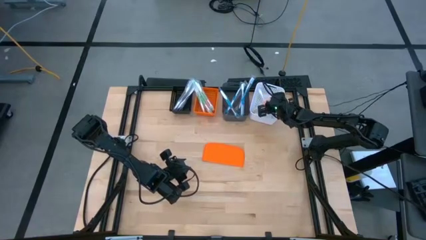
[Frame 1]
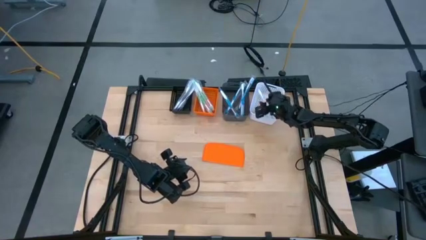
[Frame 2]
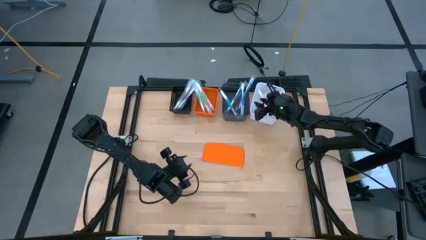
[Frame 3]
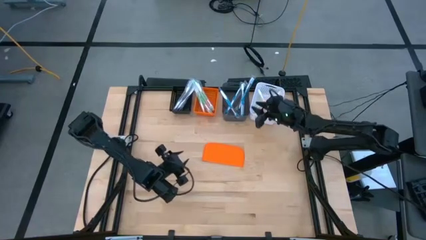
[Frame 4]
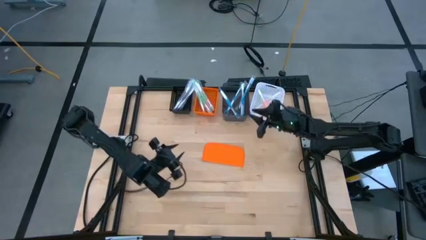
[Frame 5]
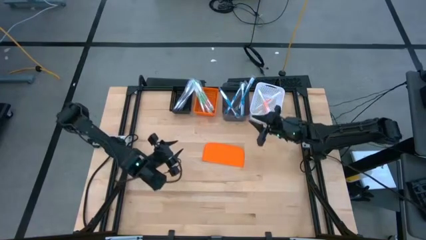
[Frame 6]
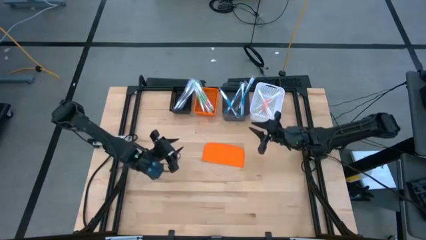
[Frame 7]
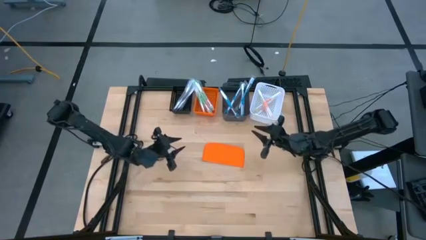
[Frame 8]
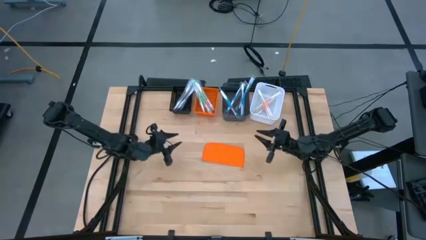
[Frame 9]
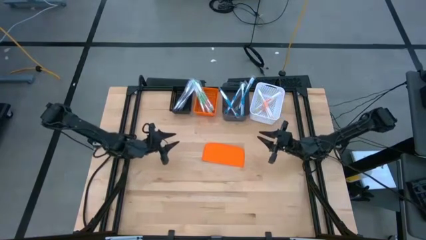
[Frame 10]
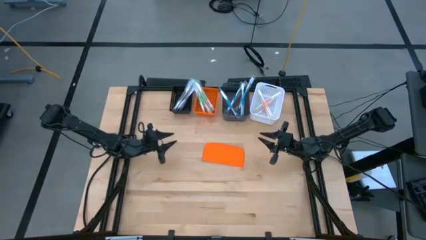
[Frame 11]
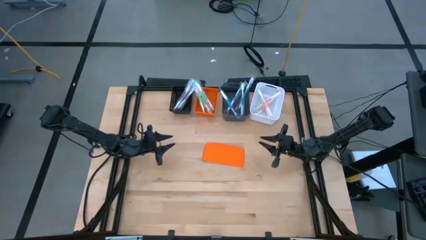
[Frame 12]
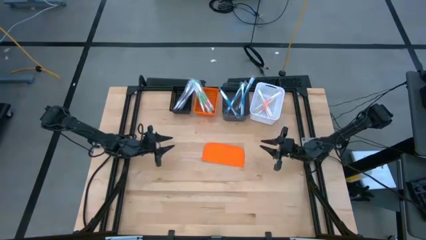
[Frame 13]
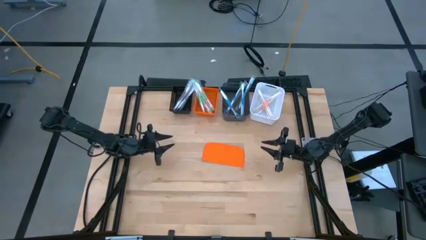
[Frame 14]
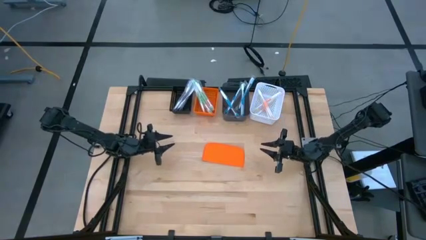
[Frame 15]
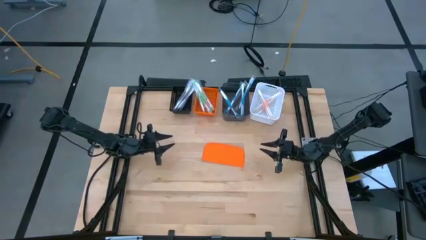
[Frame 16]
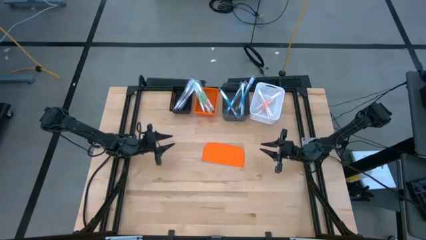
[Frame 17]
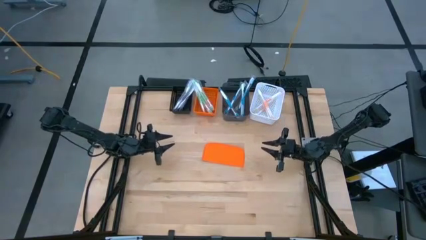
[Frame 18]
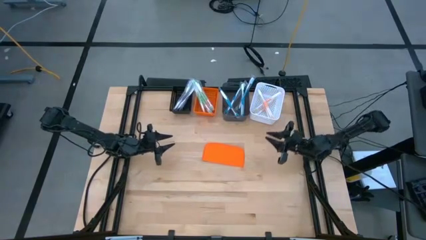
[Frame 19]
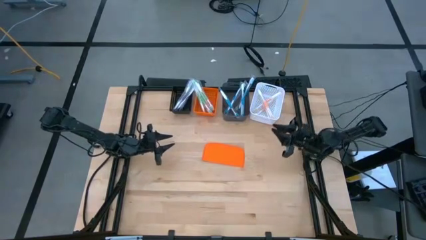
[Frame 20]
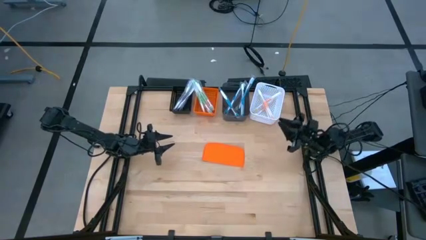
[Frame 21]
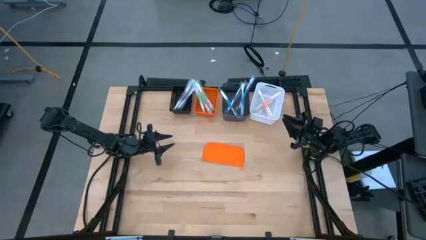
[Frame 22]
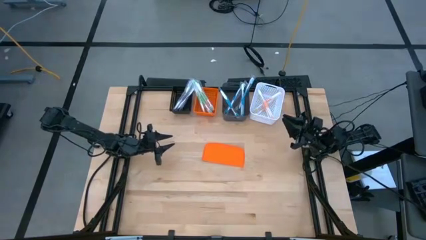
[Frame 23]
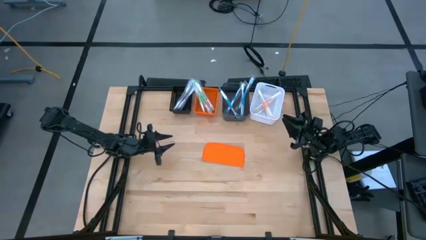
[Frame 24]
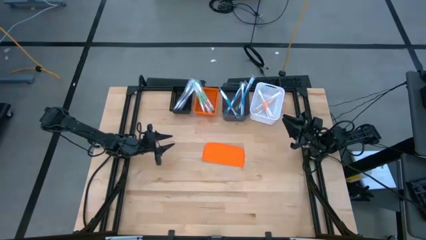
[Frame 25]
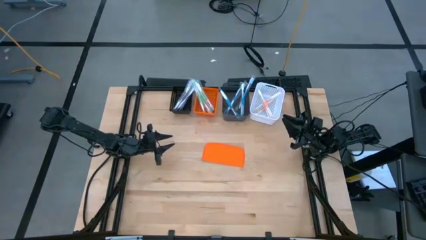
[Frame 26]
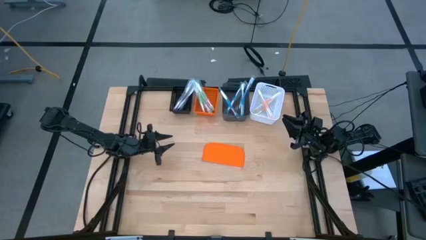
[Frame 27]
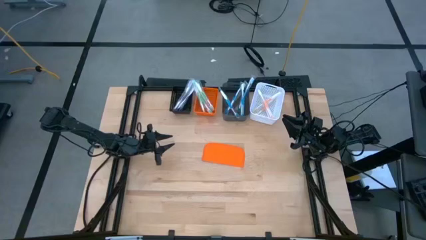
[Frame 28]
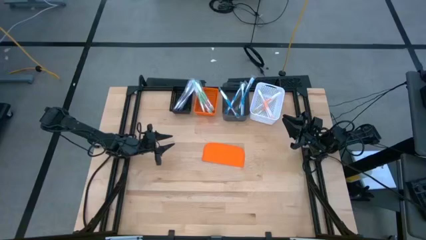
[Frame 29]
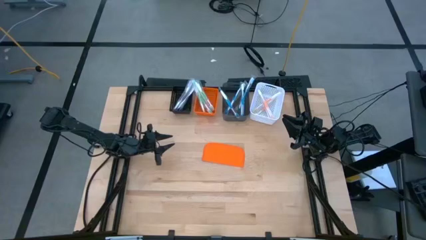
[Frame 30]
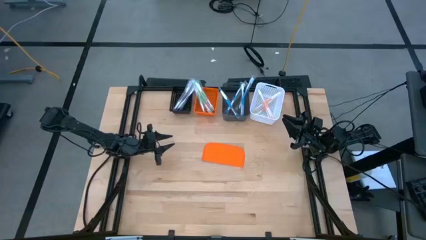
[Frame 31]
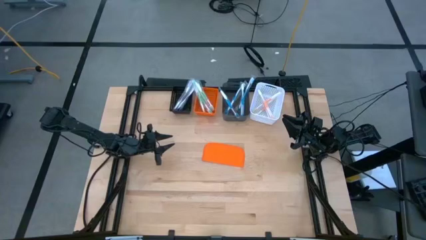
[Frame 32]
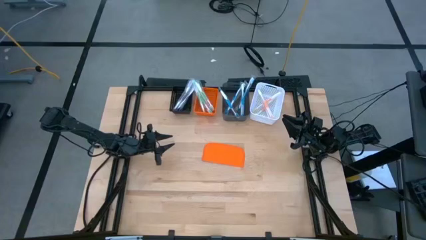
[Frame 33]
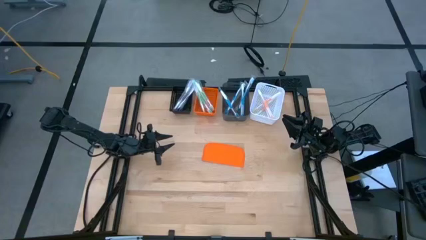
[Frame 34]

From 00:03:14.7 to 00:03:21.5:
Task: Pick & Place Toothbrushes
Return to home position

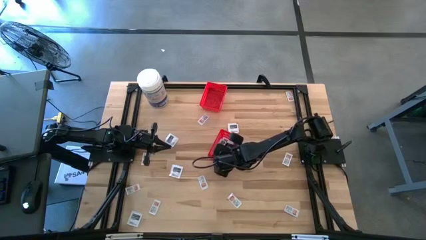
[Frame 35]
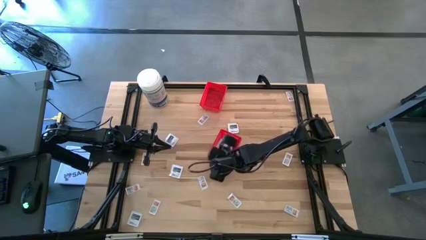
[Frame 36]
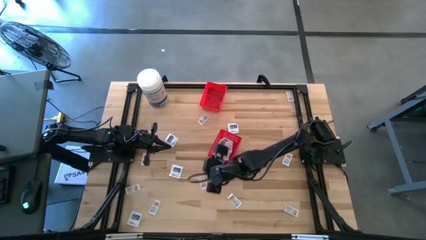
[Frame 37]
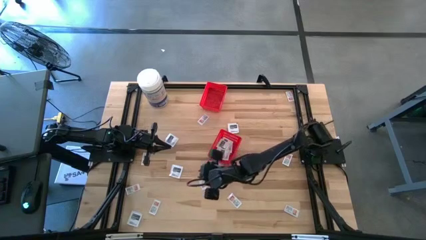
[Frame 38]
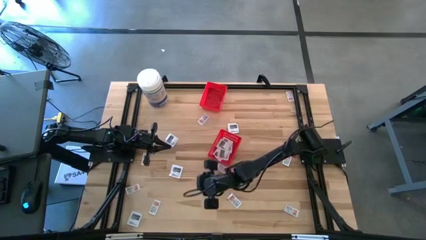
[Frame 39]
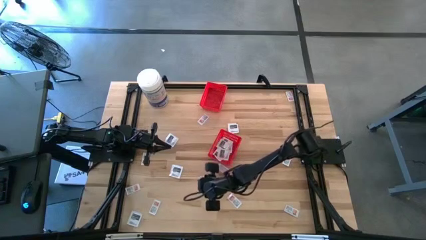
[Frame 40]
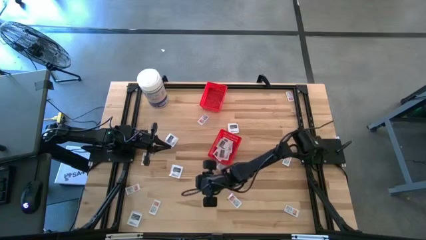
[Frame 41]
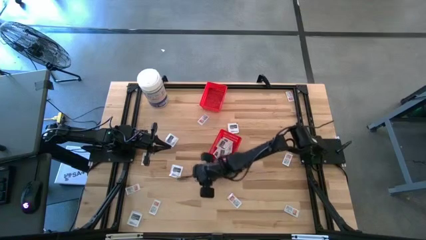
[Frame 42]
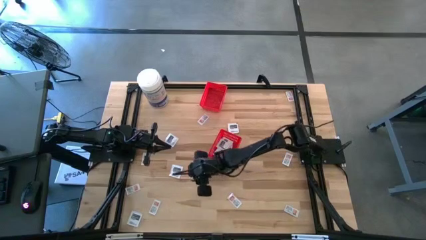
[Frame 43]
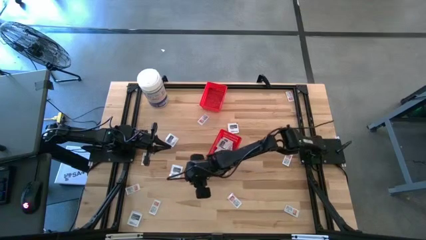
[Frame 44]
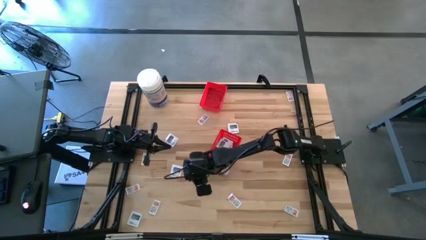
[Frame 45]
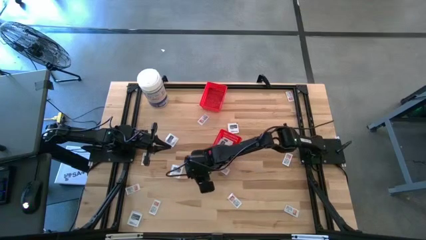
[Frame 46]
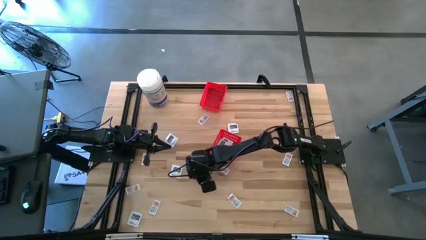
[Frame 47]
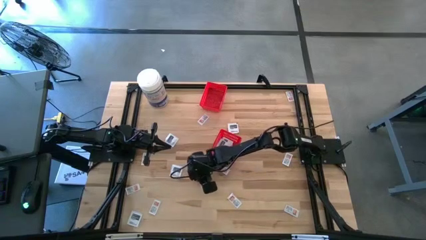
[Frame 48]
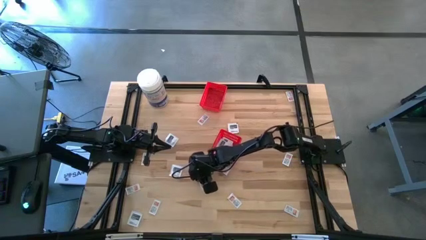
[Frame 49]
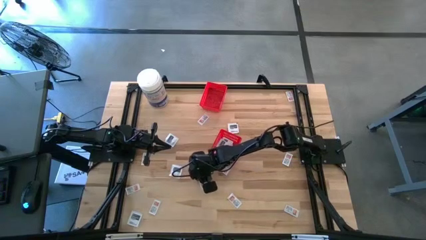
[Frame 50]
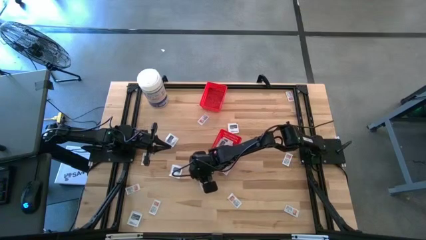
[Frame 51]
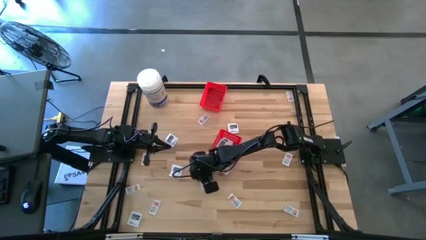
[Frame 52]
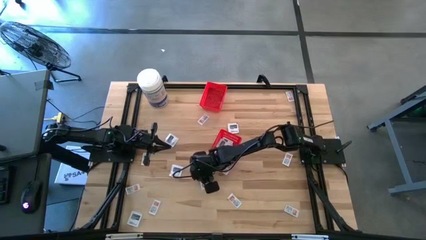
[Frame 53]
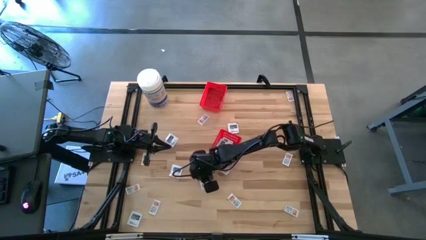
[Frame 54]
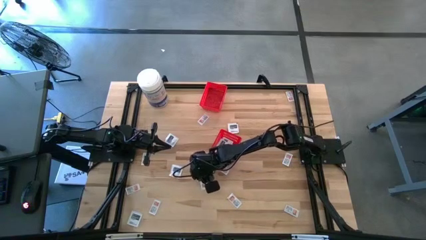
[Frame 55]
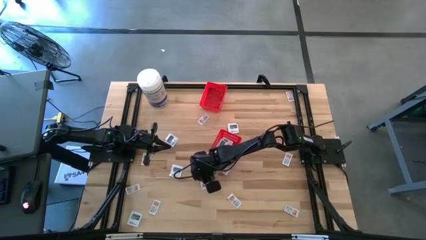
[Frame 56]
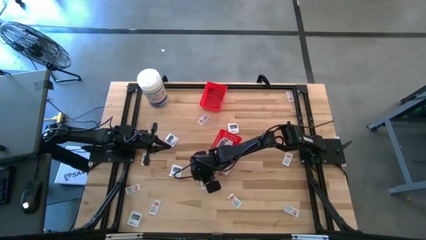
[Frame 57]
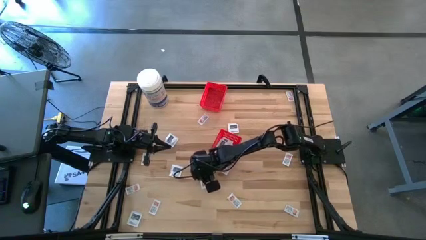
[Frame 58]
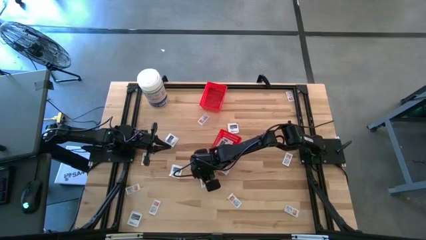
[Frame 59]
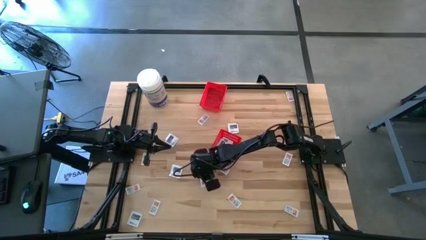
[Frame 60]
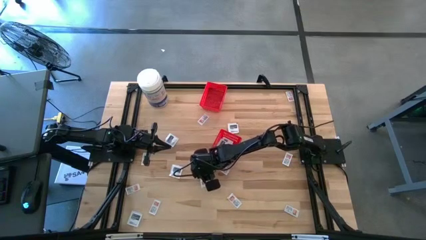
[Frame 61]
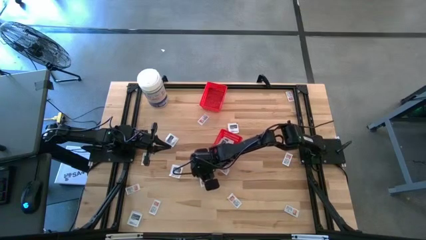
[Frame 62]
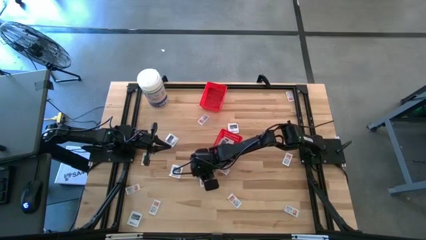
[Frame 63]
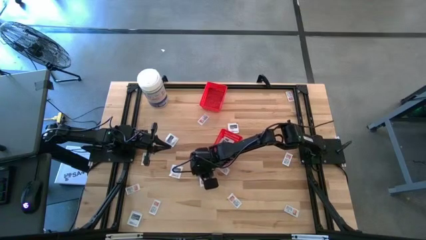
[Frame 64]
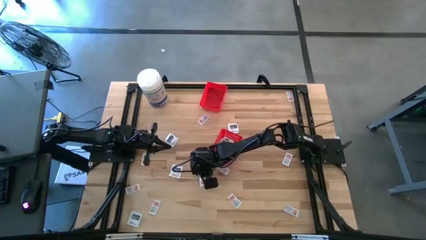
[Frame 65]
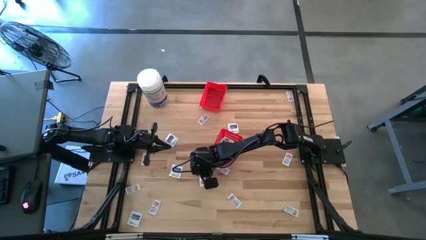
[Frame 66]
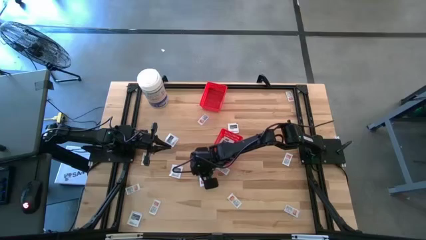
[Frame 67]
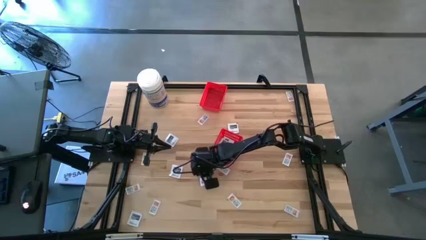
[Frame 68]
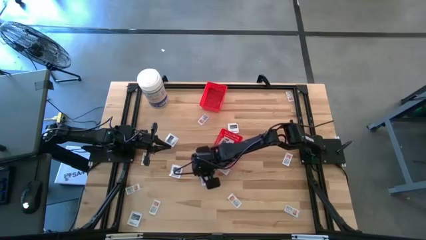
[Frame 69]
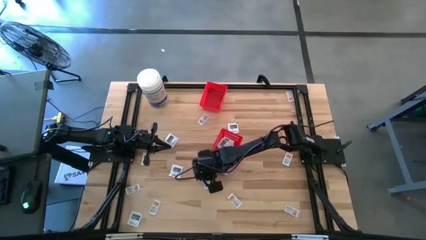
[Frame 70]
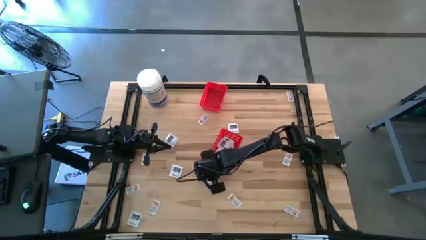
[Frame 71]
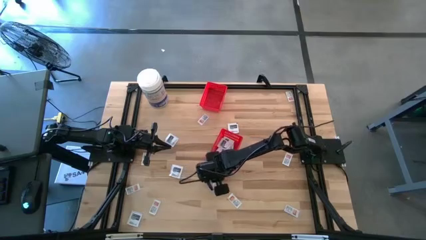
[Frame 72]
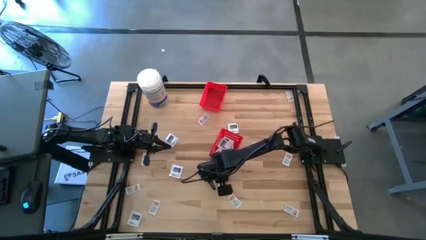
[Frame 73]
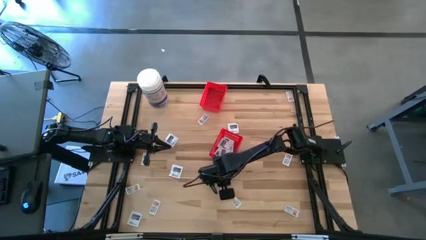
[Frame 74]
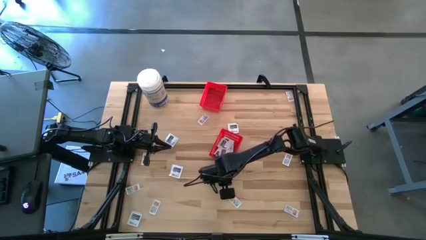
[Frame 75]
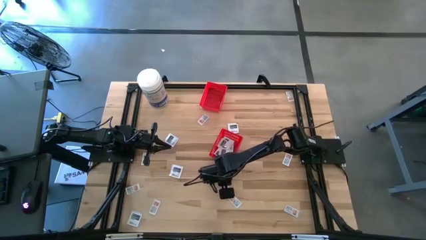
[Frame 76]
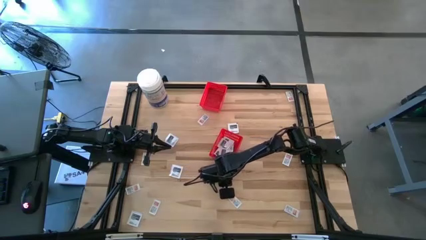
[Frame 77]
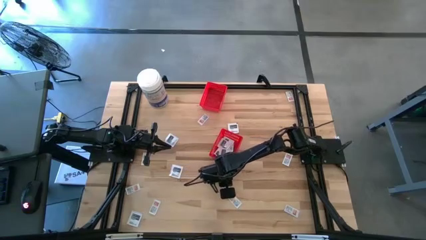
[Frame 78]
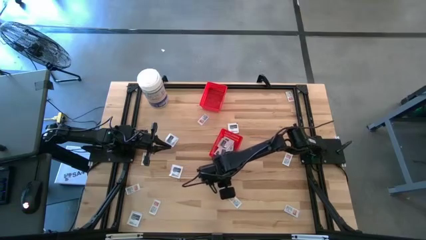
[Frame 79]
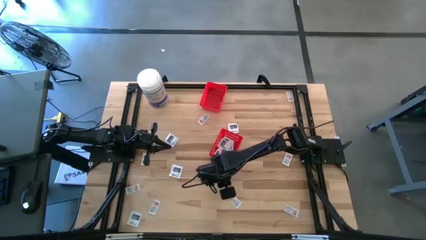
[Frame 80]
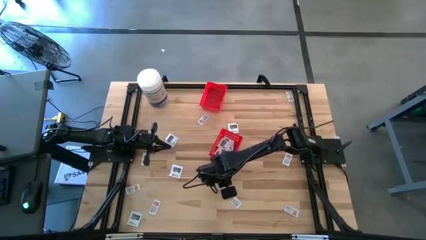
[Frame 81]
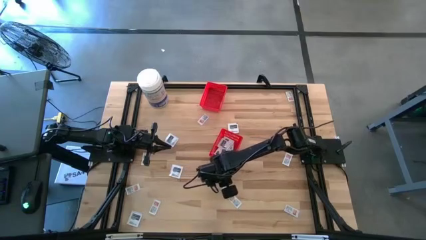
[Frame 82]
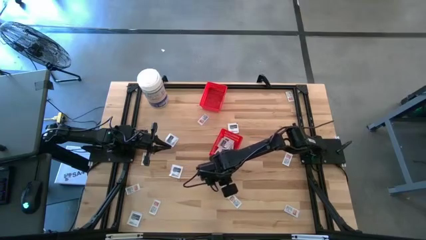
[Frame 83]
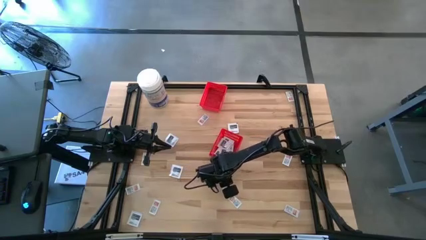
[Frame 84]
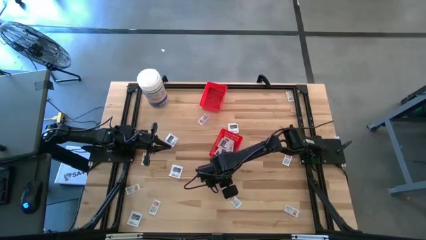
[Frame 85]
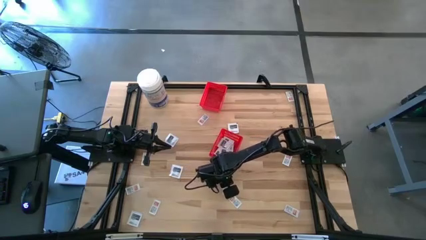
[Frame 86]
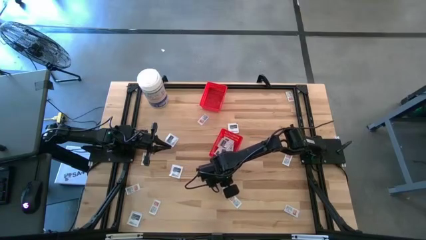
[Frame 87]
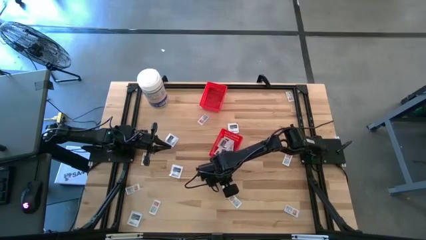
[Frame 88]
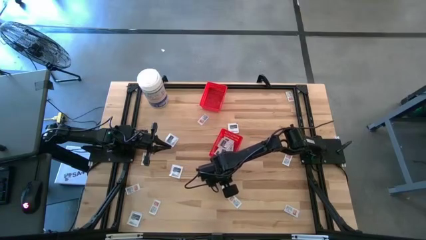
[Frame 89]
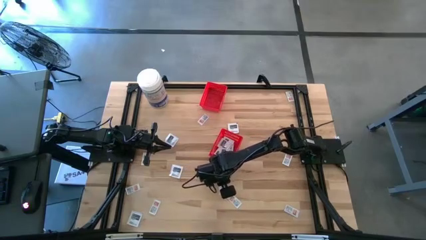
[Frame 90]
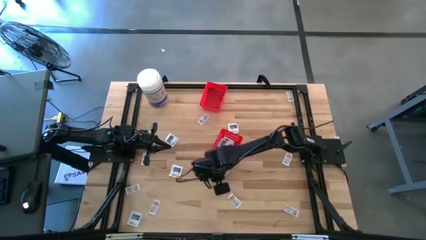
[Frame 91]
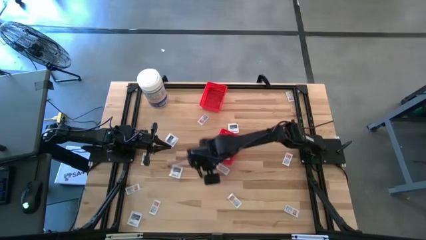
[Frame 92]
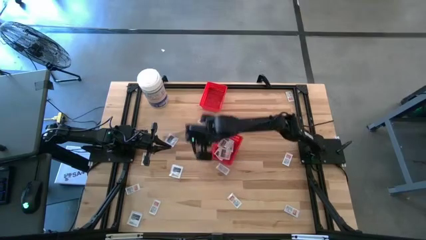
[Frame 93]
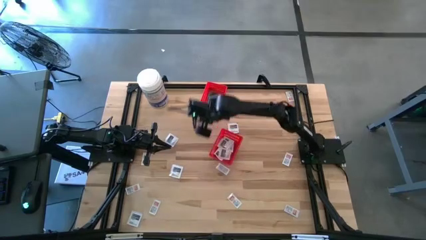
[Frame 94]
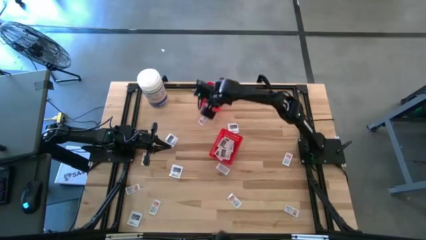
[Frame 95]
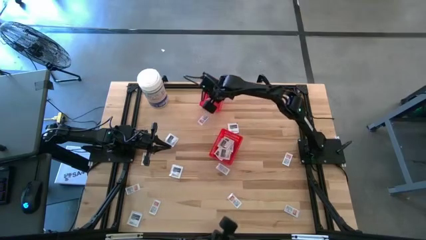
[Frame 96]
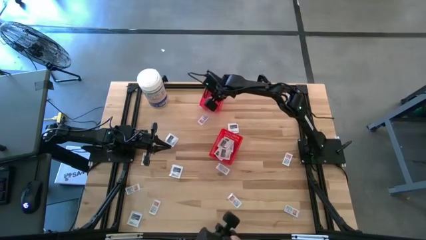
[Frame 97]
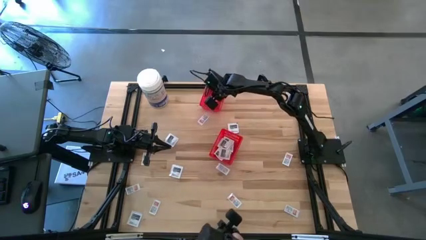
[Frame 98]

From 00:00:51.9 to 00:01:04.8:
Task: Pick & Place First Aid Supplies
Put the white ointment pack into the top red bin
